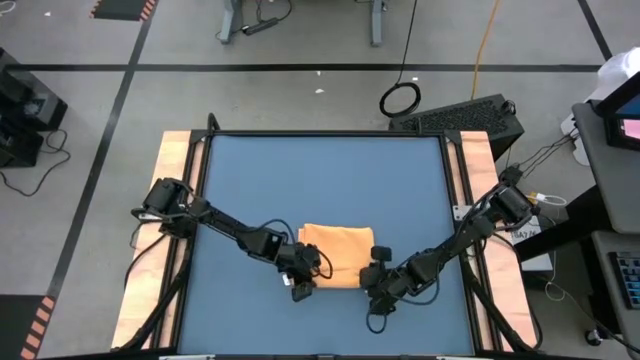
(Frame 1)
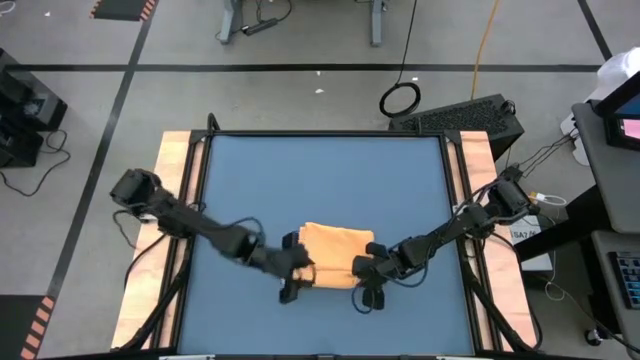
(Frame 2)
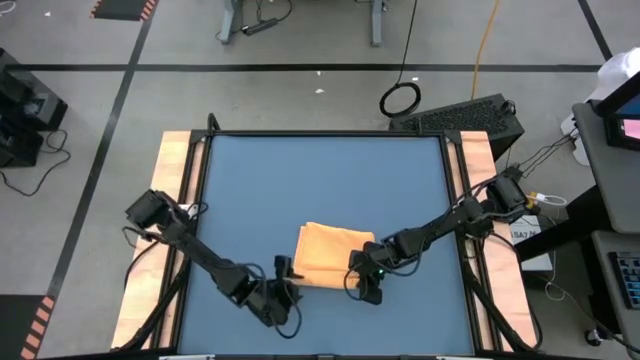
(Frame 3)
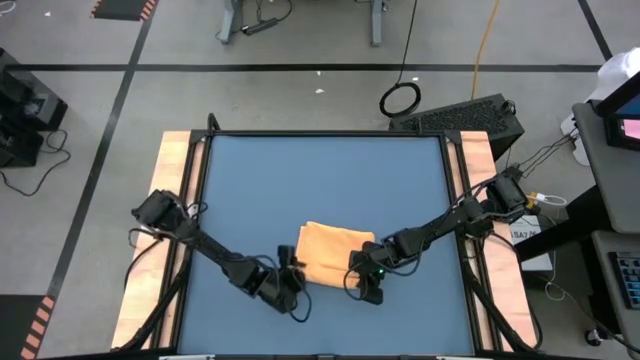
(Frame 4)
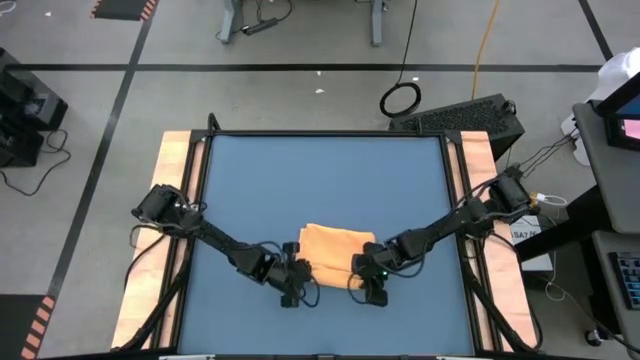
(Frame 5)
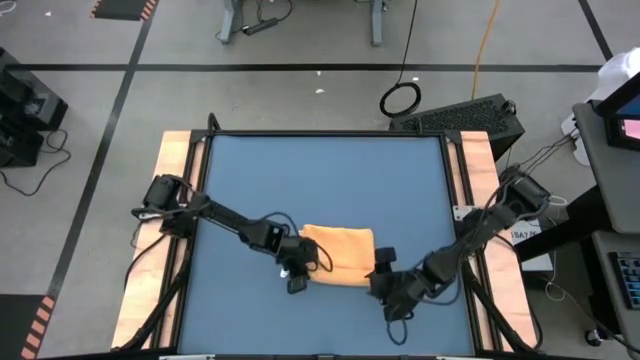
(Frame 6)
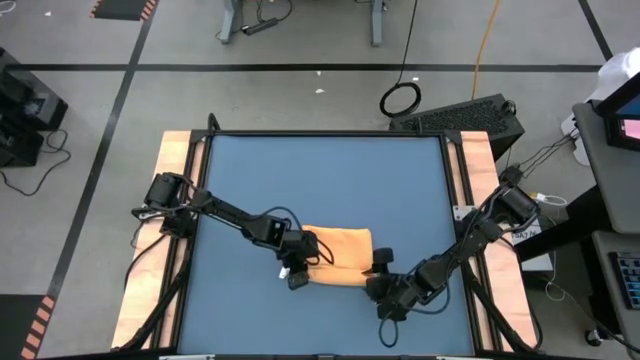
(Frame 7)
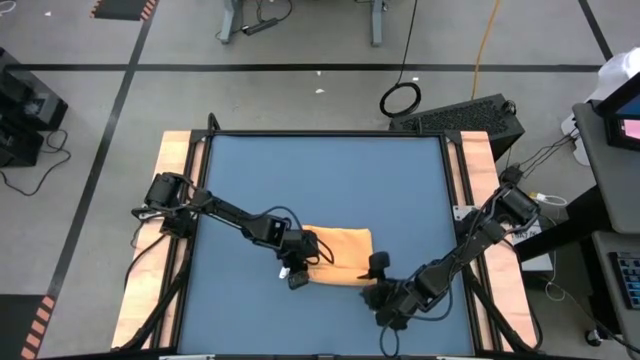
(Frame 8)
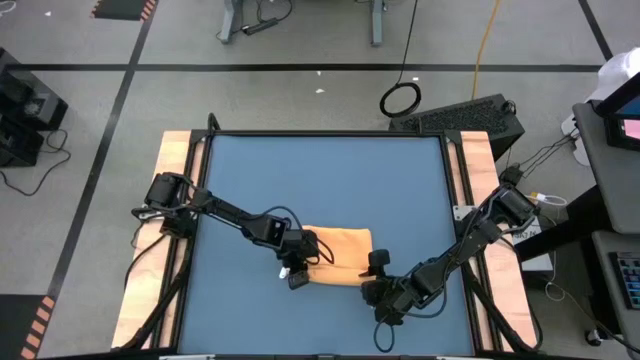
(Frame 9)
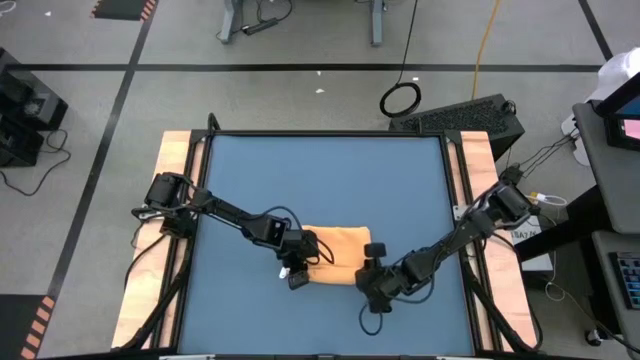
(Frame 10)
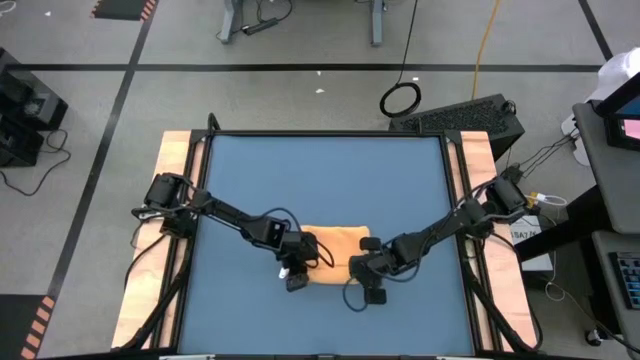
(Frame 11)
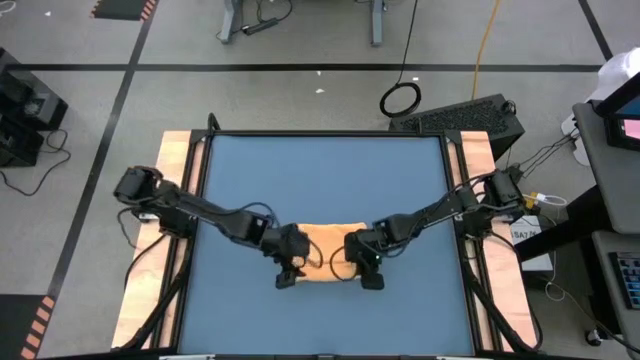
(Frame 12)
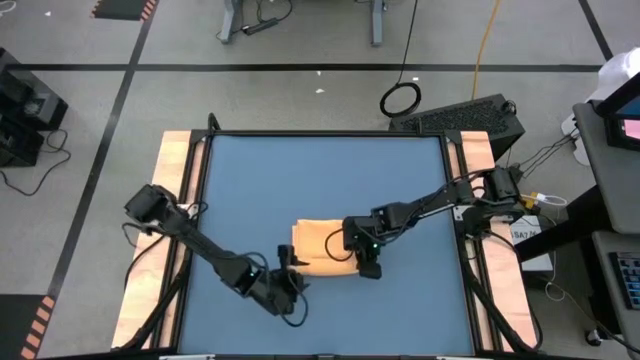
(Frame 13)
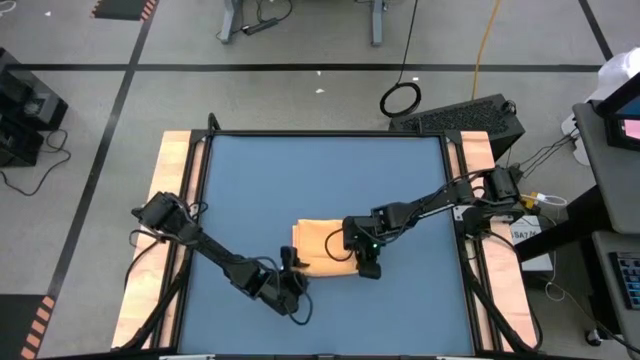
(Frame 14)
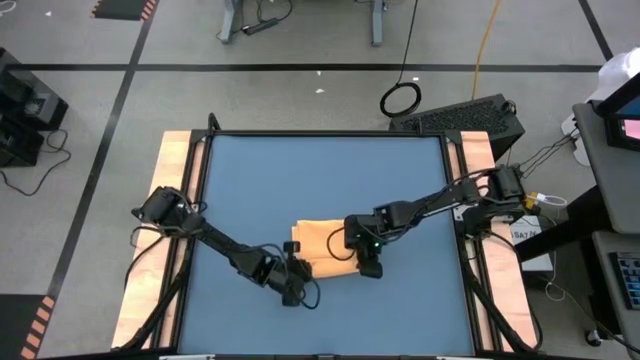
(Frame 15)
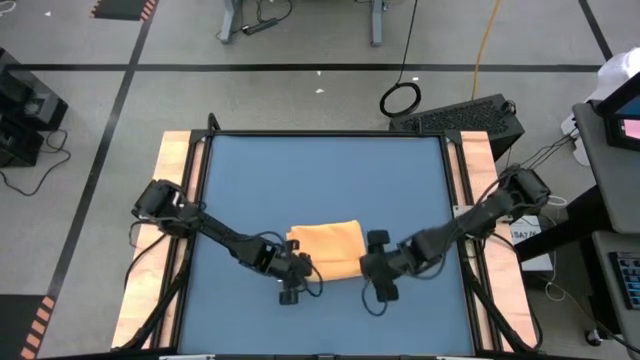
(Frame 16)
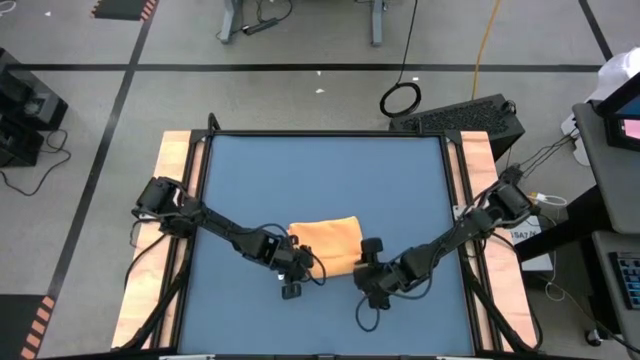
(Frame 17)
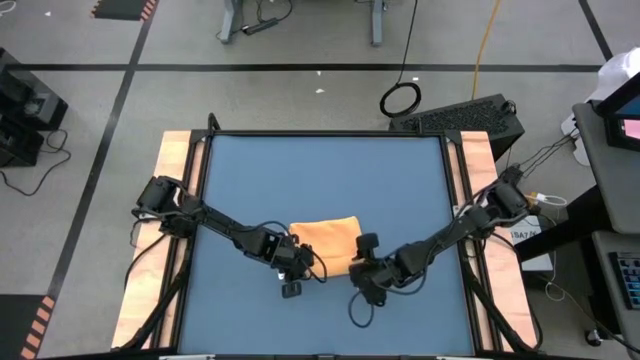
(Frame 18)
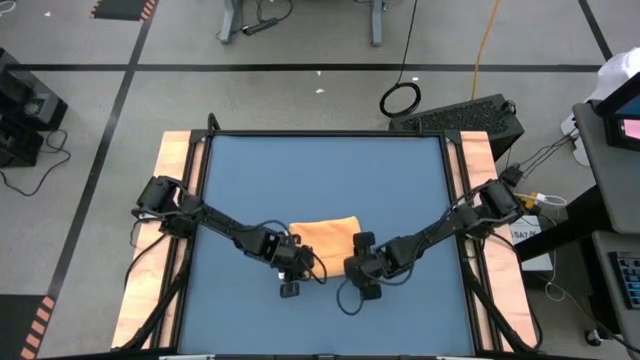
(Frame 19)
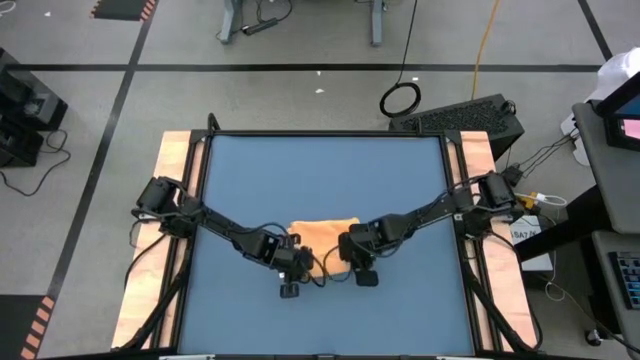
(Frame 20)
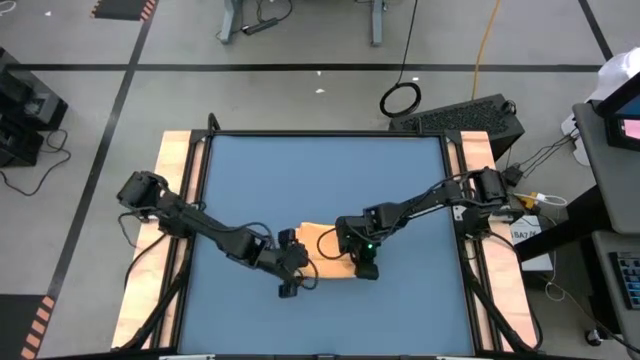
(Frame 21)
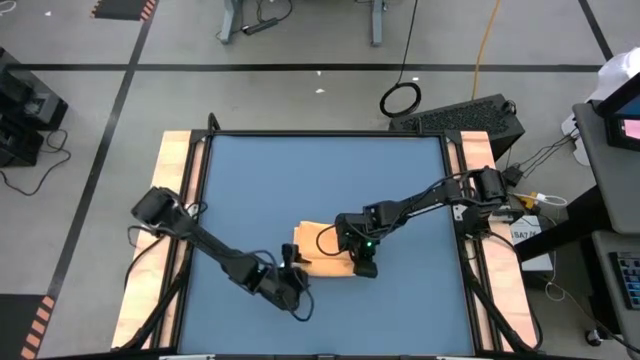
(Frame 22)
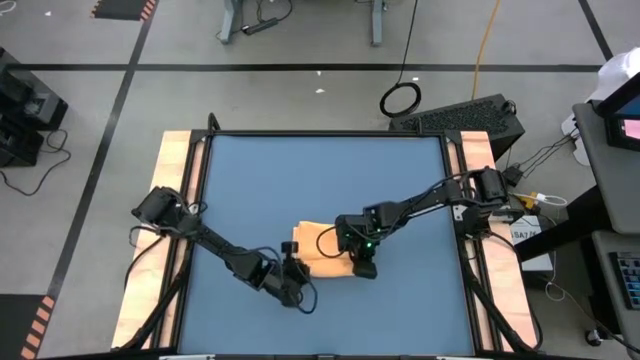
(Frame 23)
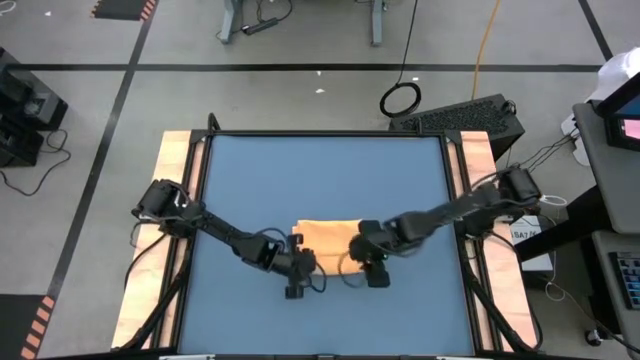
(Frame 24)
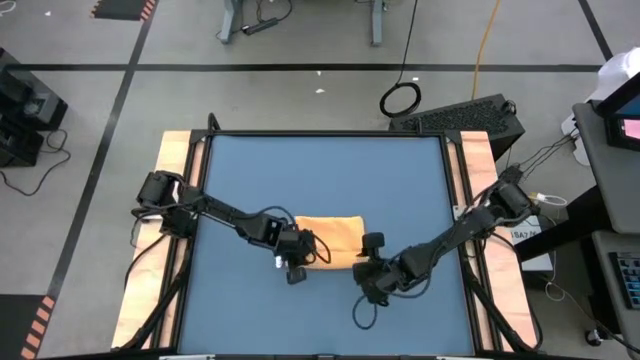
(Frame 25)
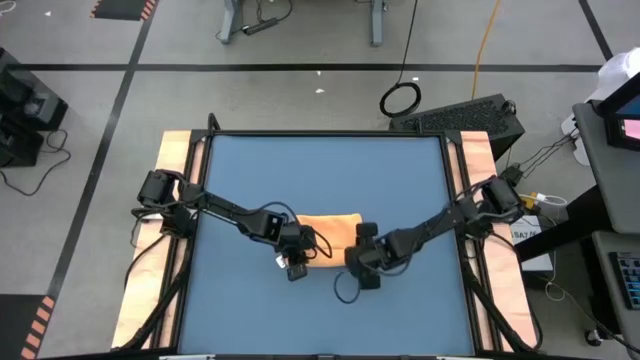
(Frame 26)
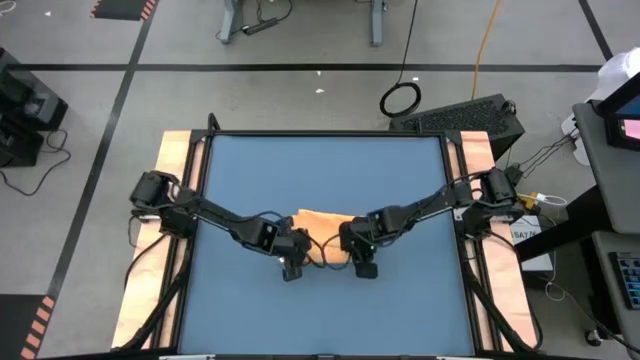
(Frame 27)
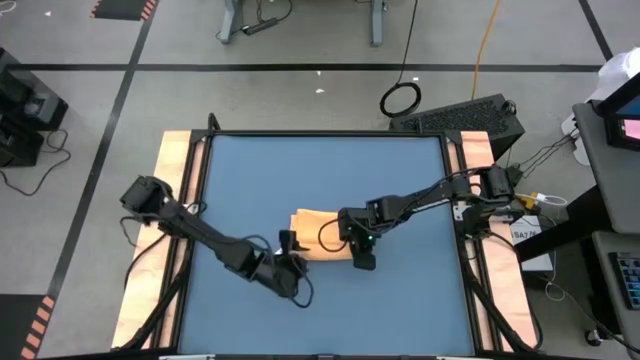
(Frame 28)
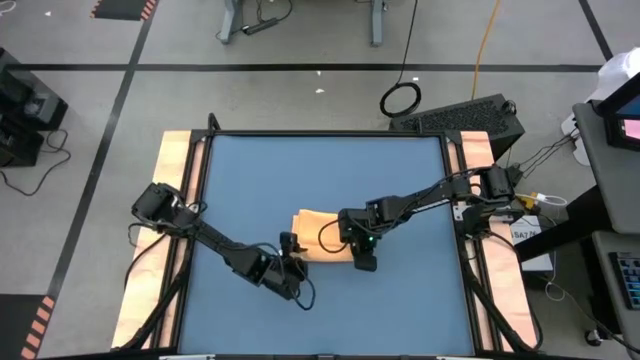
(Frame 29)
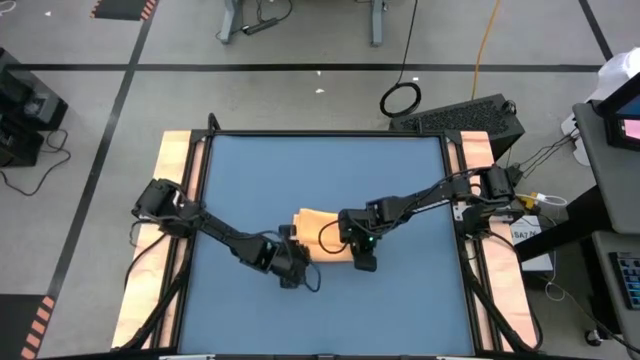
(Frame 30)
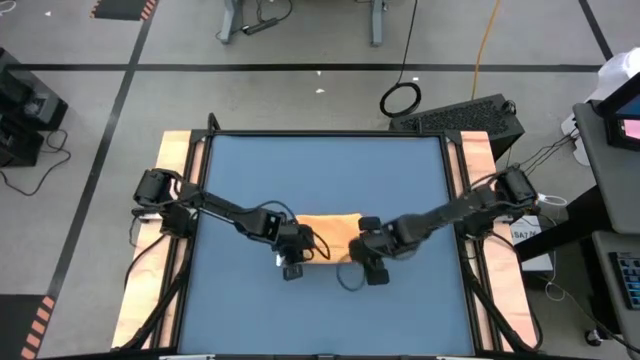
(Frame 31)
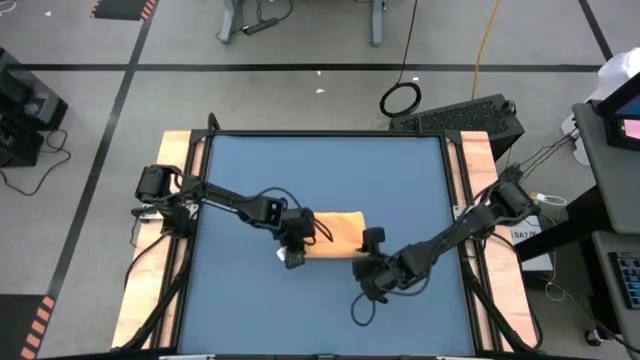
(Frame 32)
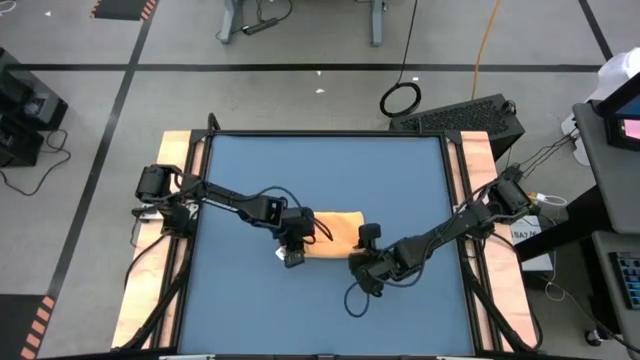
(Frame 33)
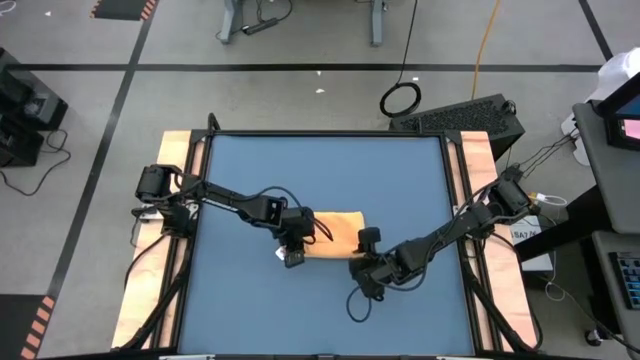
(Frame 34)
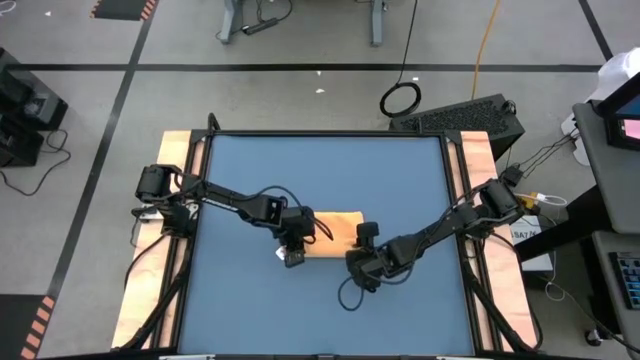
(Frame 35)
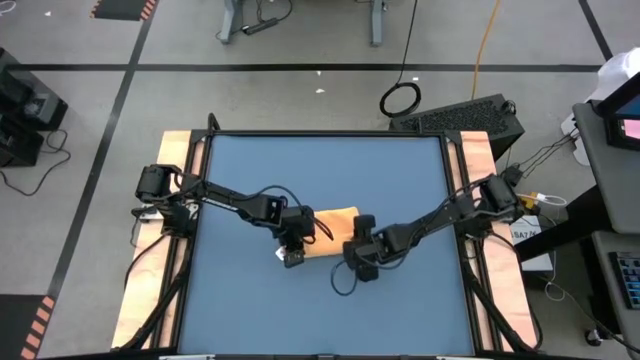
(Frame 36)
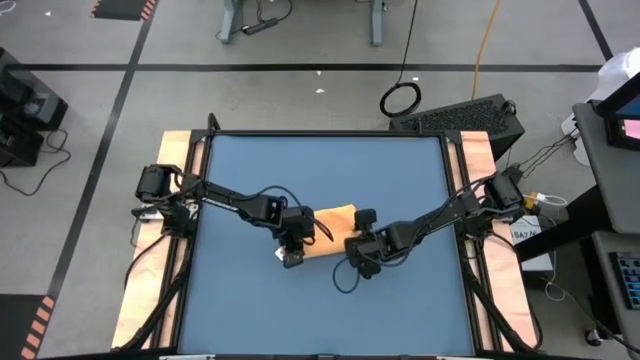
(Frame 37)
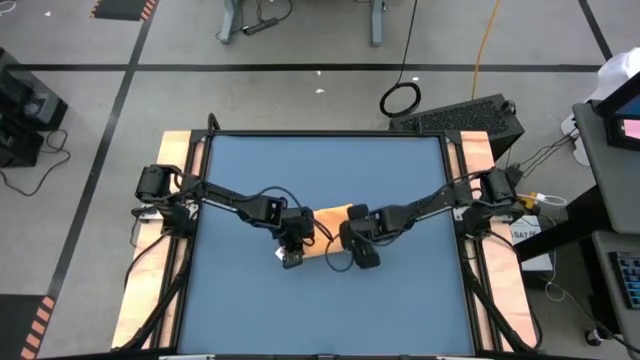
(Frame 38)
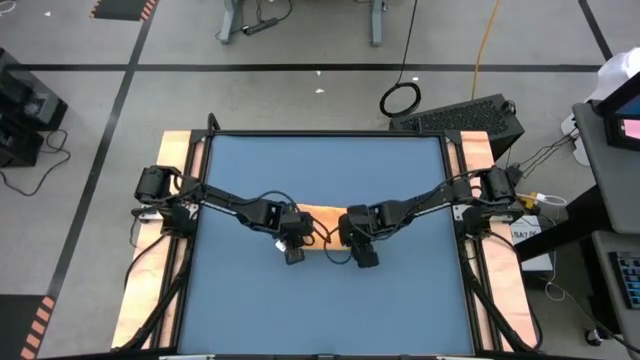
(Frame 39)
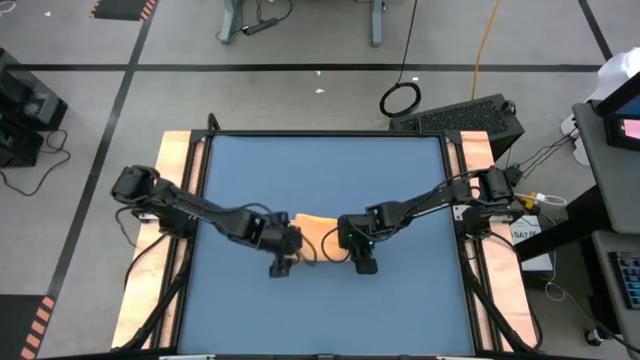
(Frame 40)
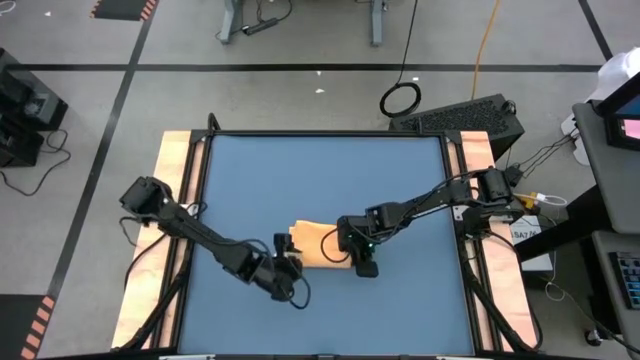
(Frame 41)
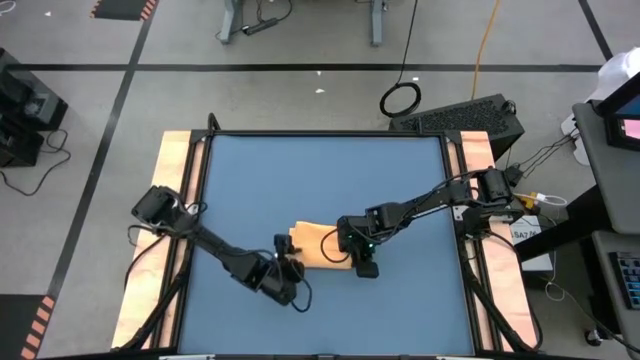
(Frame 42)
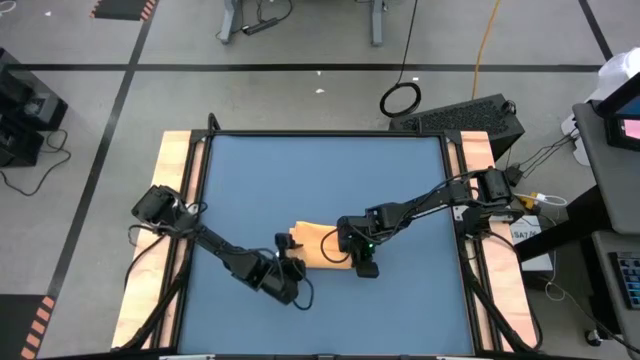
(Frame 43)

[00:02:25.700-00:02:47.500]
Task: Roll towel
Roll the yellow towel
